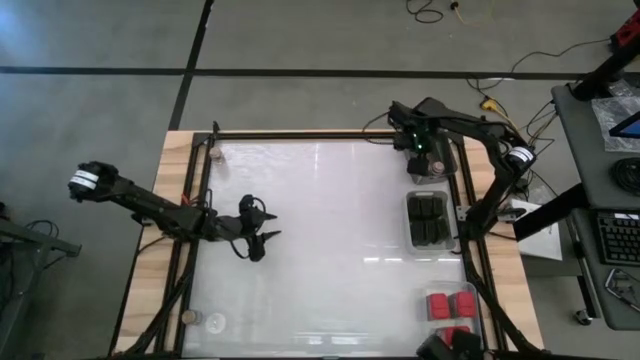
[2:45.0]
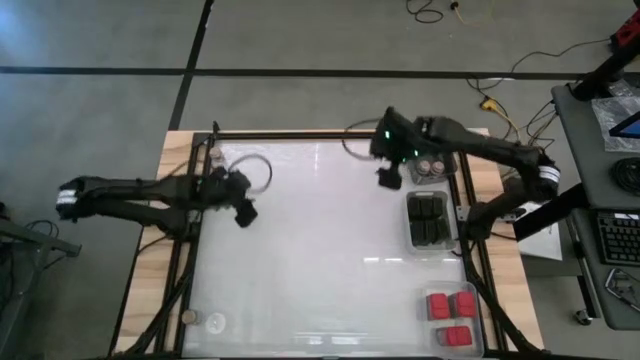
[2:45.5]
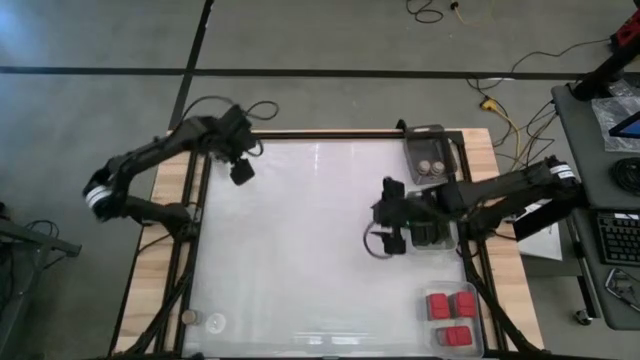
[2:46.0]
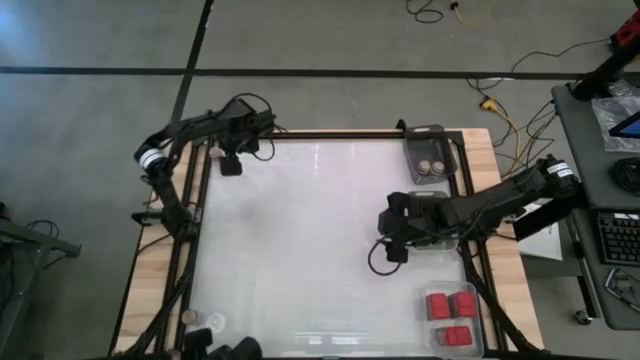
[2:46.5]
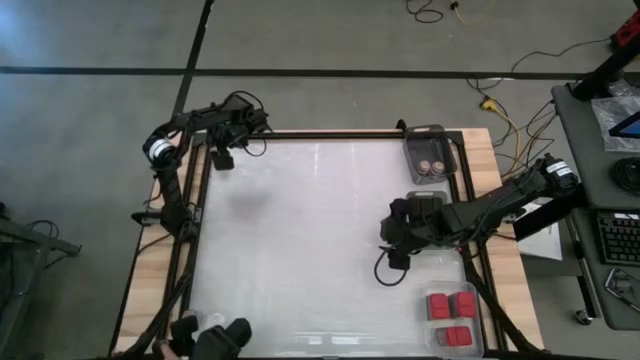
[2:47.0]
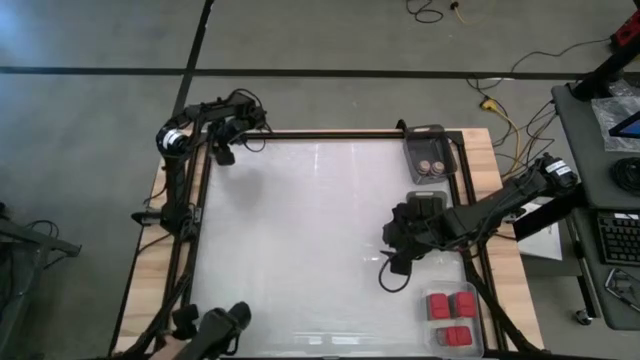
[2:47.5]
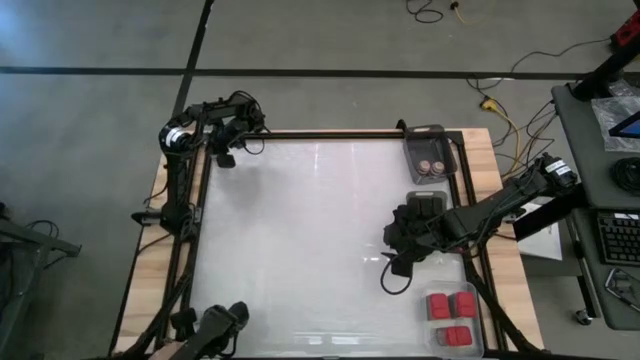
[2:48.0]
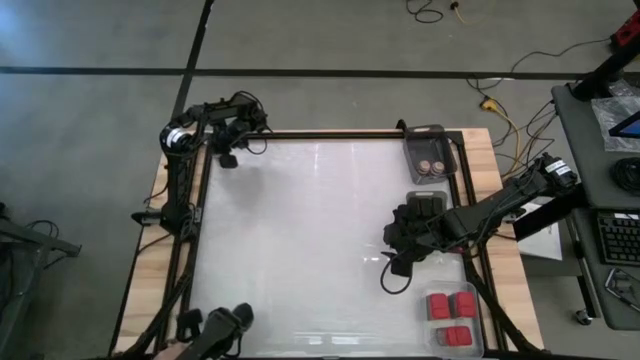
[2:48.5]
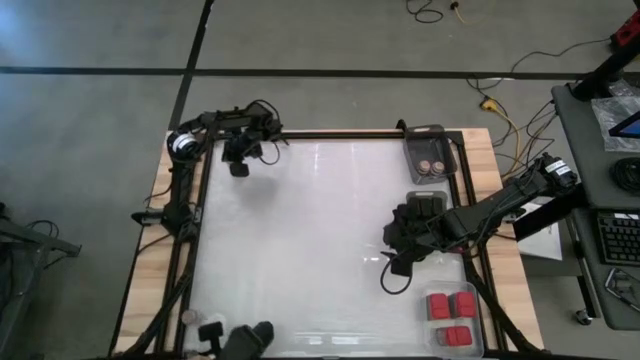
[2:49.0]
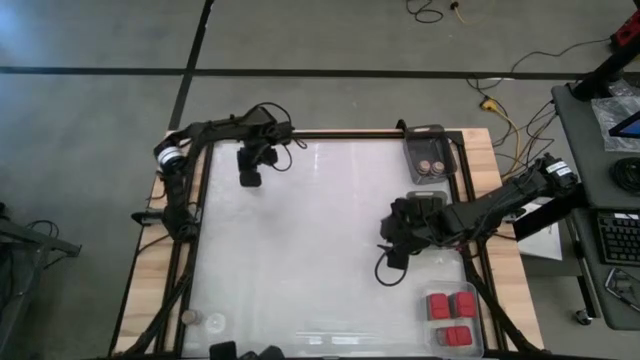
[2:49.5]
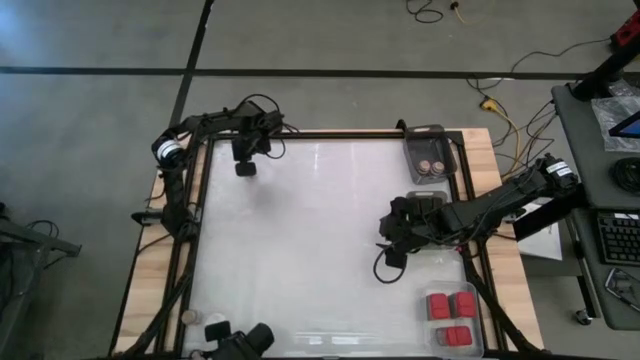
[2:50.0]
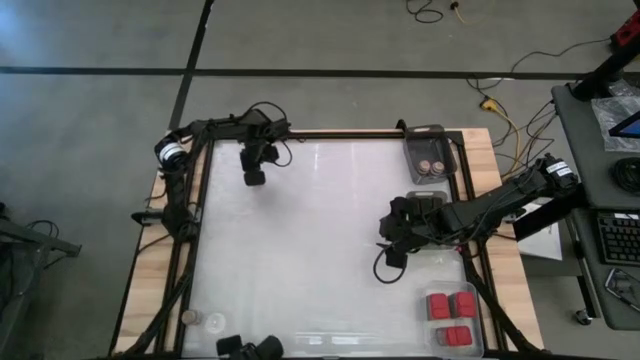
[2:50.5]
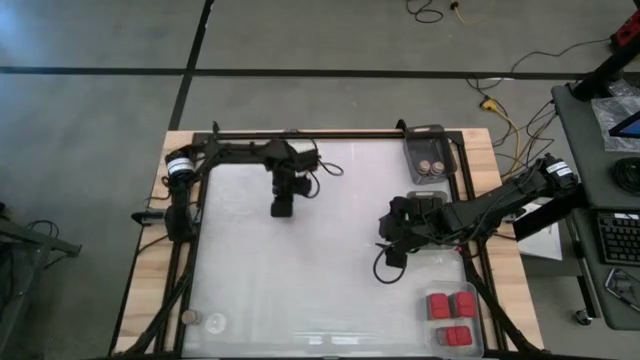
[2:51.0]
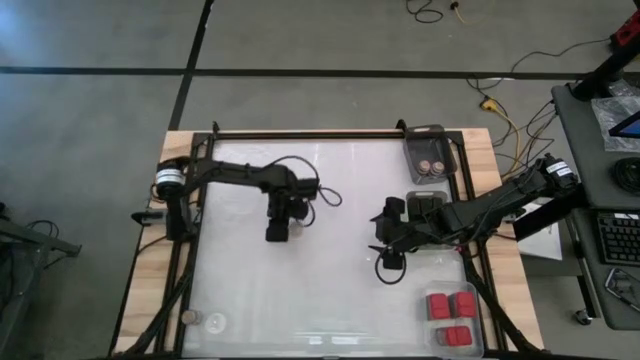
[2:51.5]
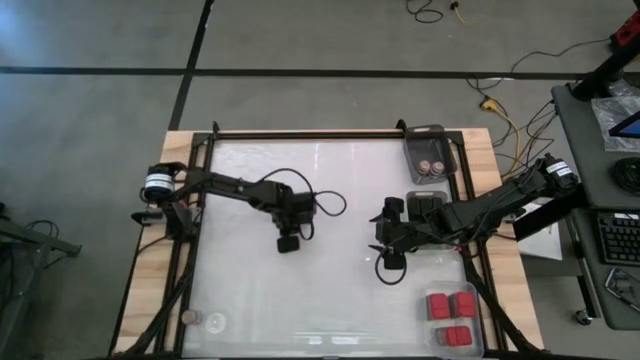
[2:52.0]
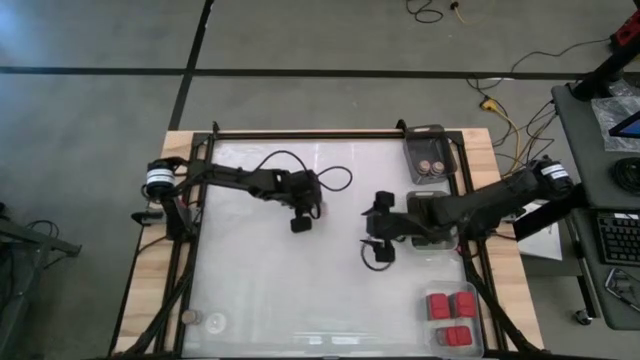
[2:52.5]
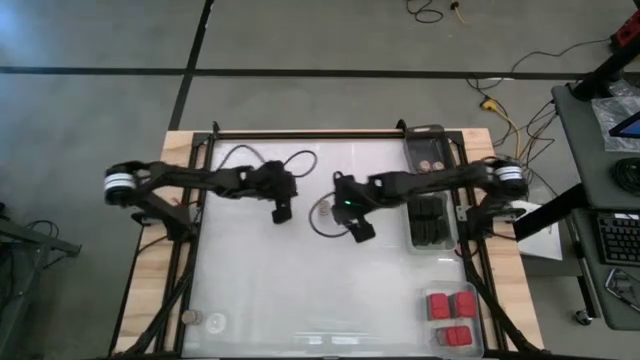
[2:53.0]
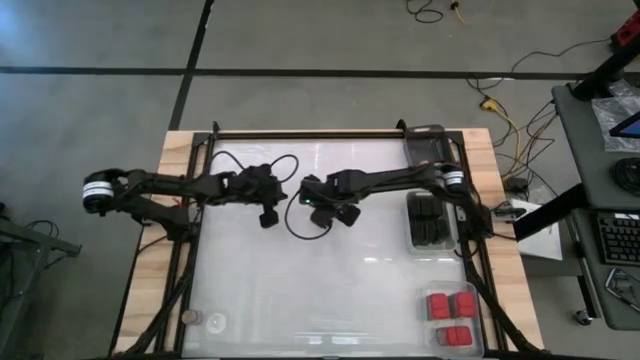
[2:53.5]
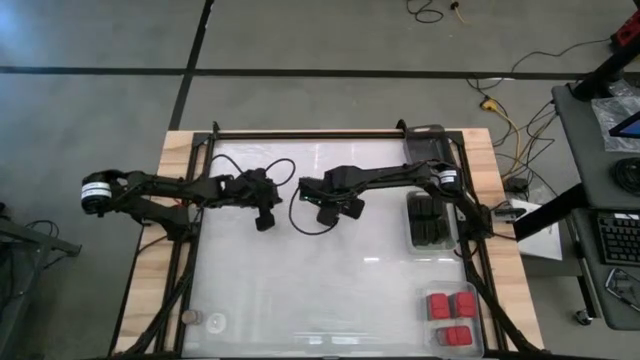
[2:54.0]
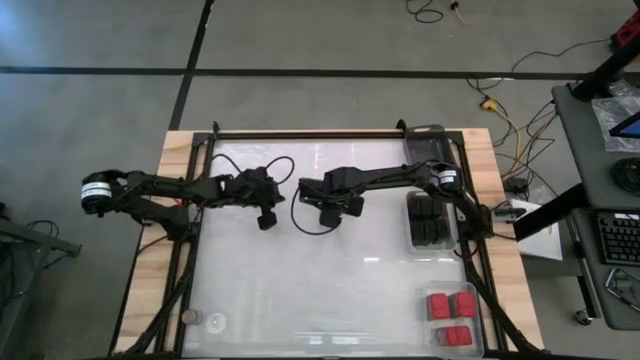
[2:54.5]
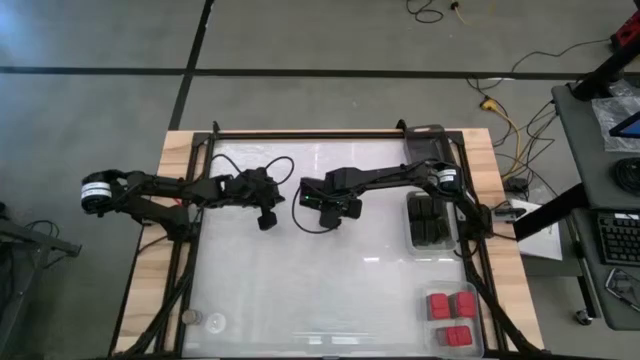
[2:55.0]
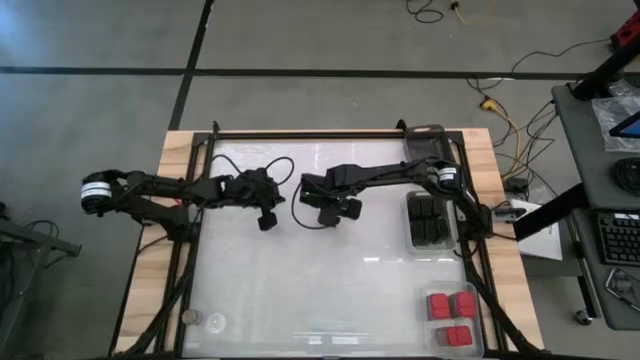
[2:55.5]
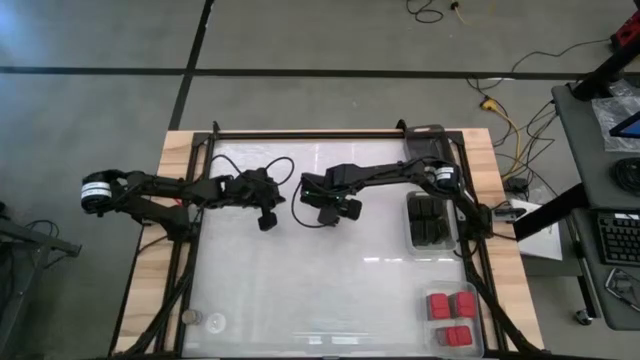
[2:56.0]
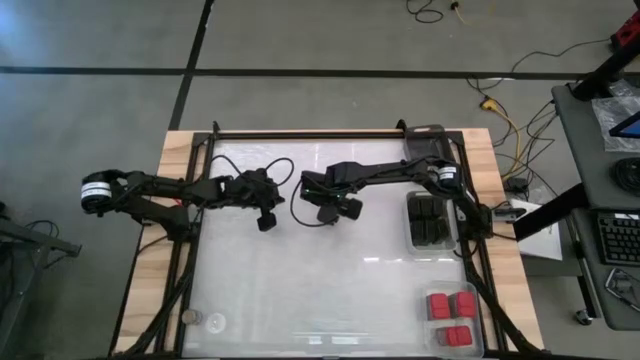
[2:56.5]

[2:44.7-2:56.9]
Task: Sort spices by type
Put the brown seasoning bottle into the black bin

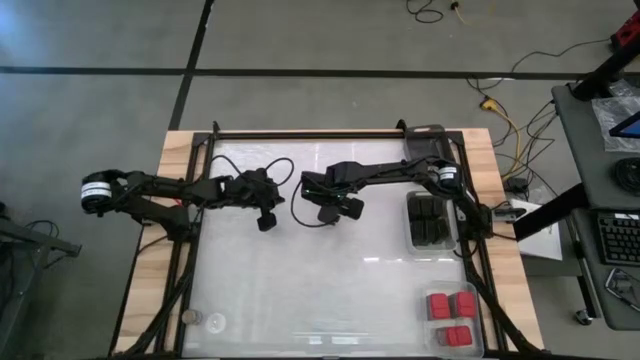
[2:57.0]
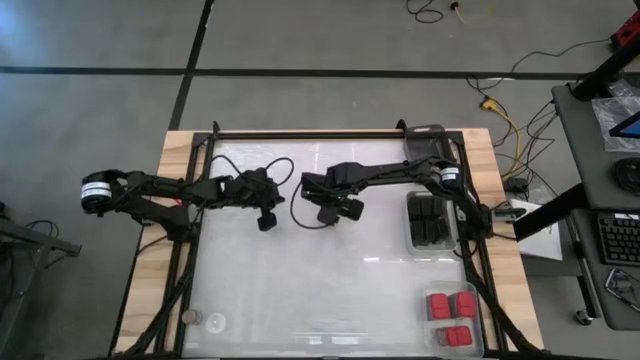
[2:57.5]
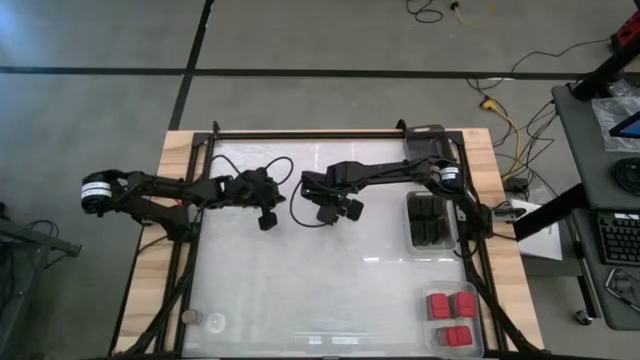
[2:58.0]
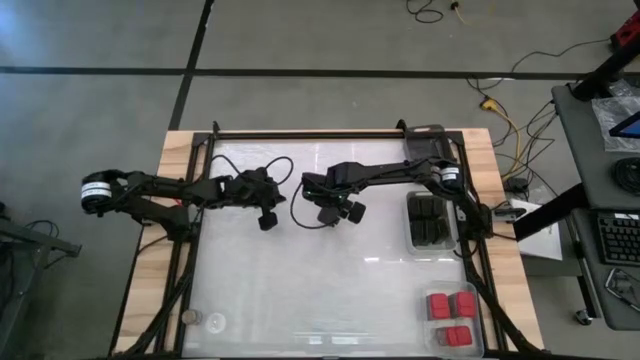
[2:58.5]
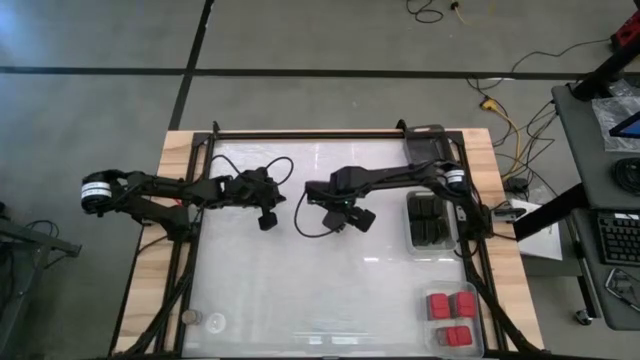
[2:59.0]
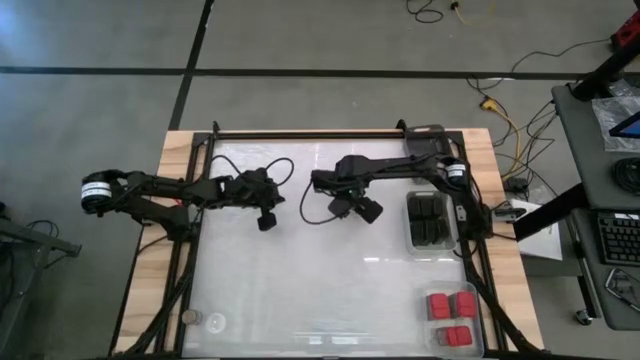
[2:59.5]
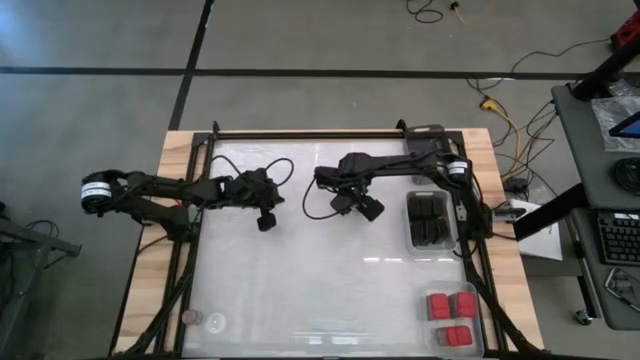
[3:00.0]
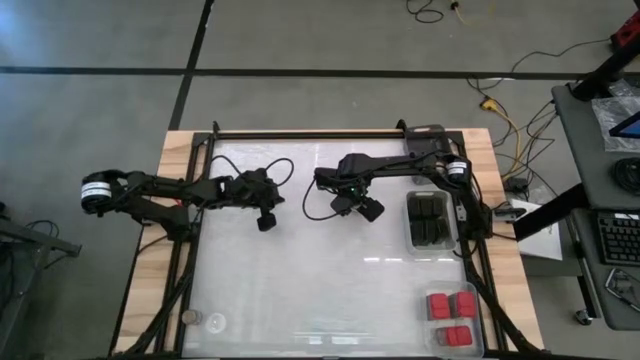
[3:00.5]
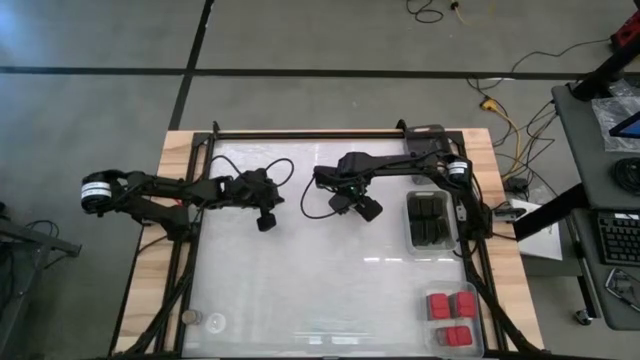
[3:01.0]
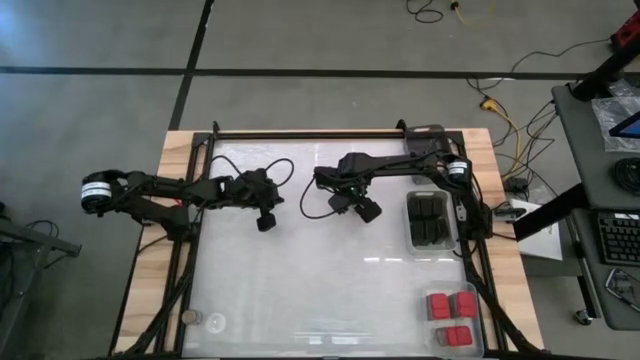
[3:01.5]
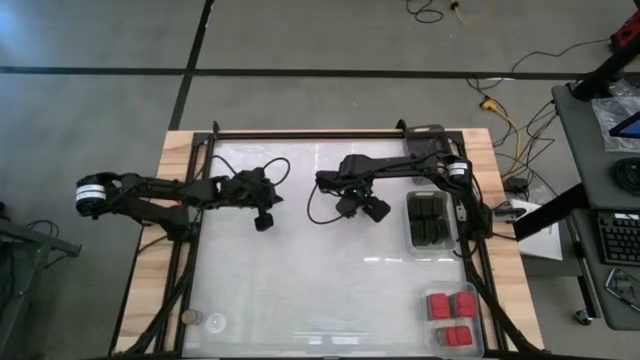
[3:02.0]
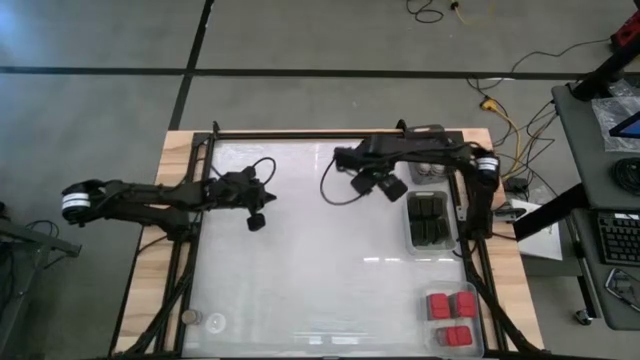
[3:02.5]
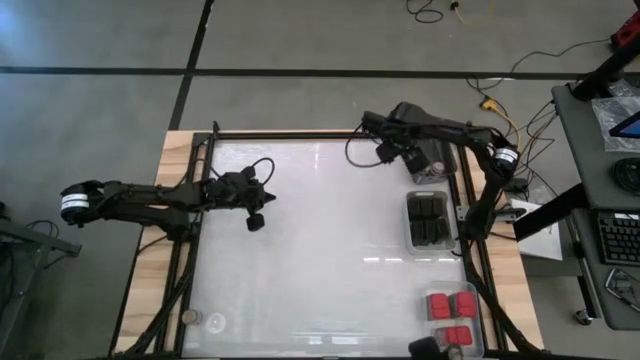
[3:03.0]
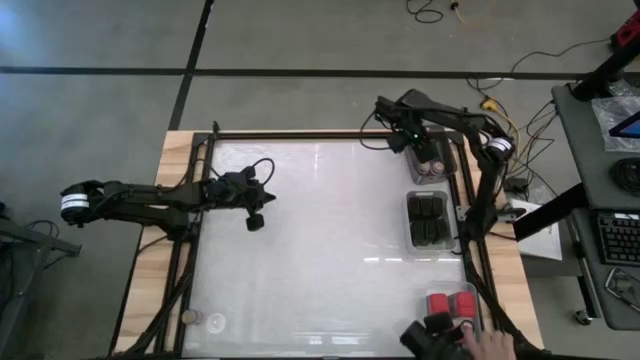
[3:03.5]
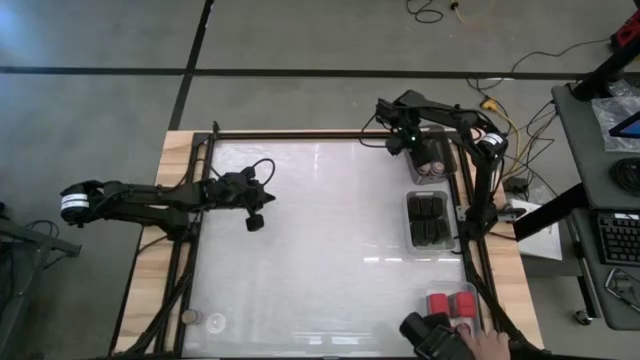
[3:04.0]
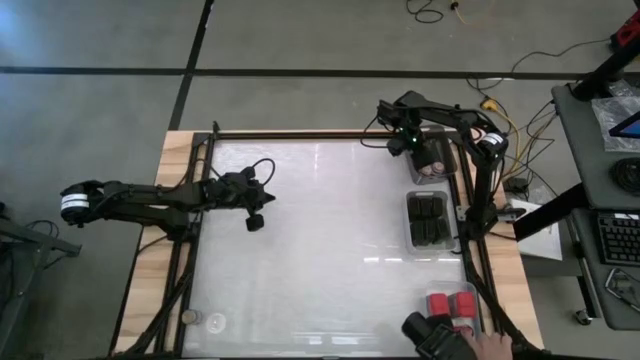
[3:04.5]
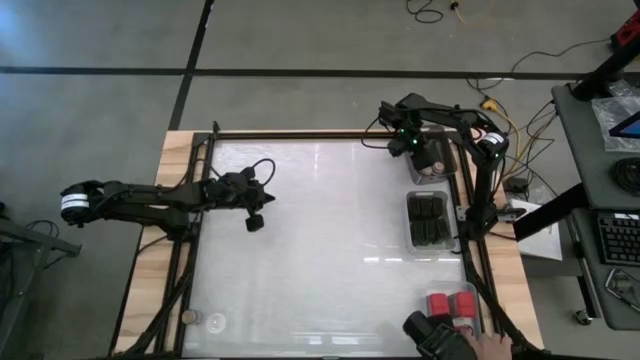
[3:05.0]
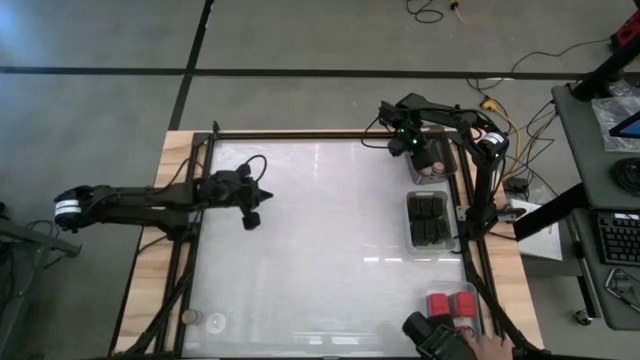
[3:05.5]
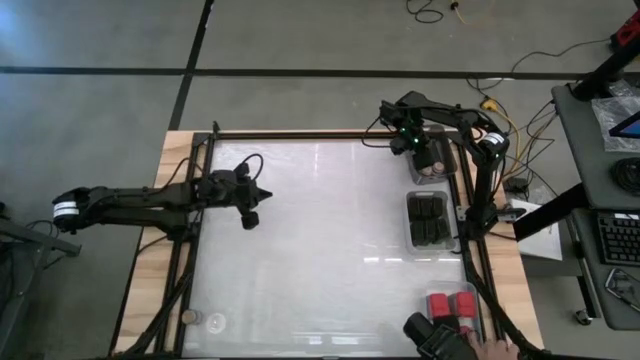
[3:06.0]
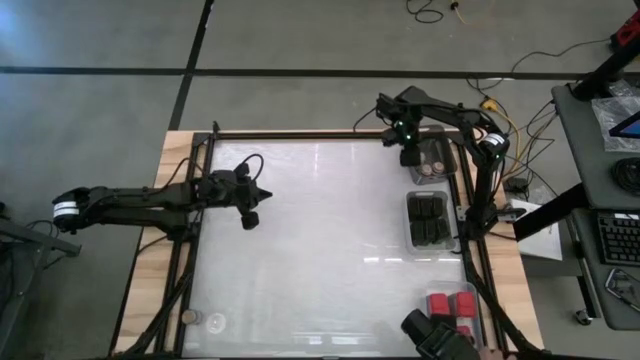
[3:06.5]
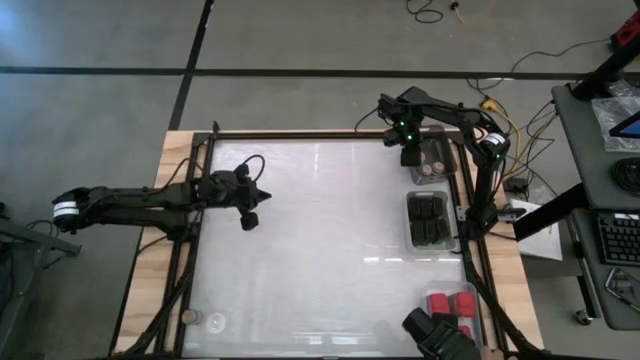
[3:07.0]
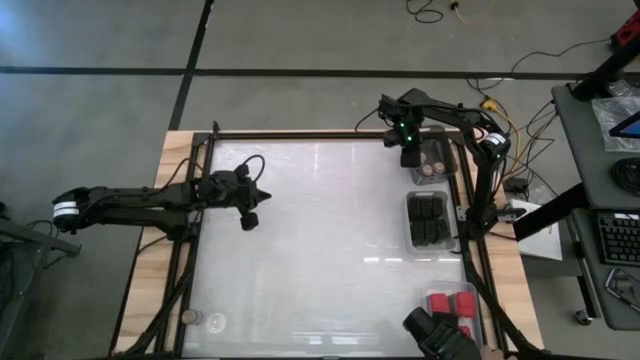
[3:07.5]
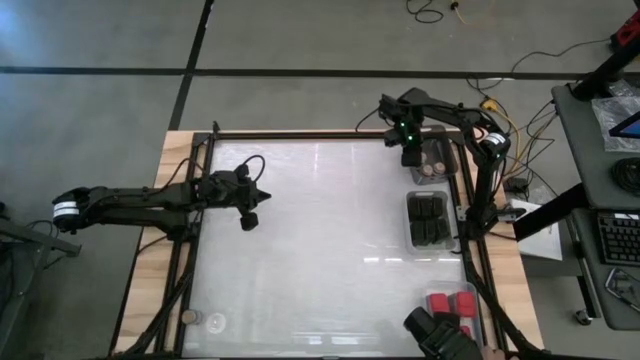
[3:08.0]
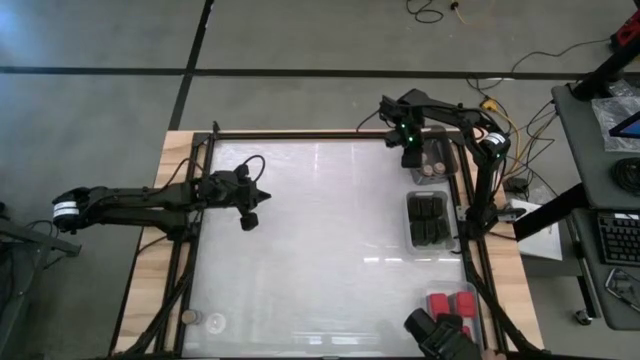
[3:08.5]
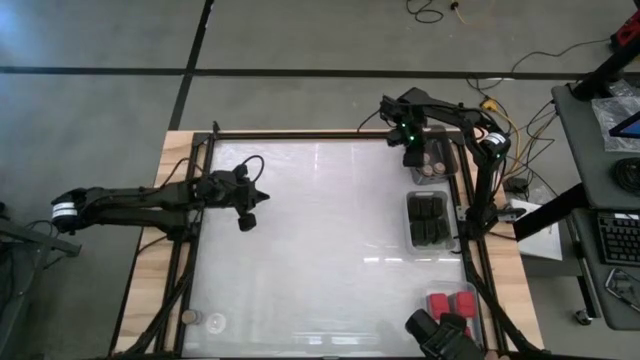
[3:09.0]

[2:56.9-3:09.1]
Put the brown seasoning bottle into the black bin
